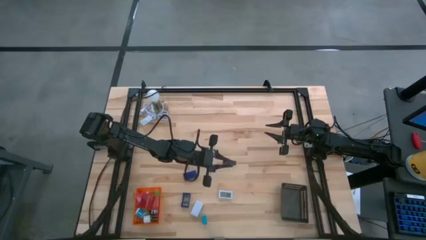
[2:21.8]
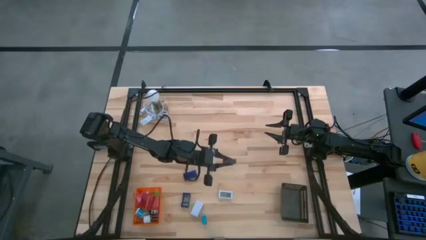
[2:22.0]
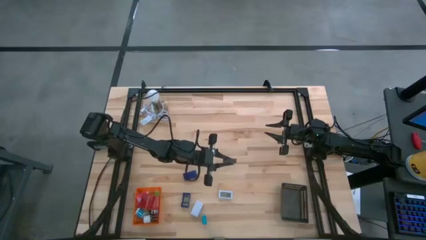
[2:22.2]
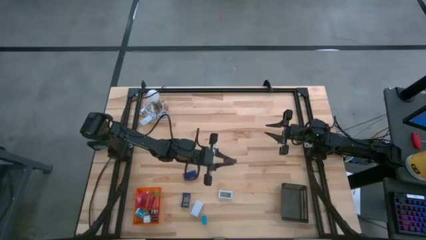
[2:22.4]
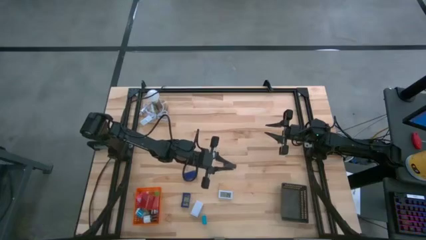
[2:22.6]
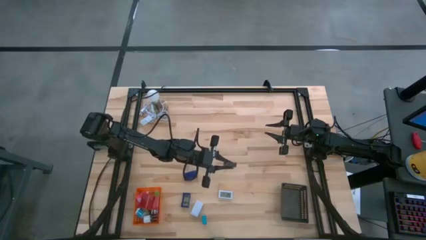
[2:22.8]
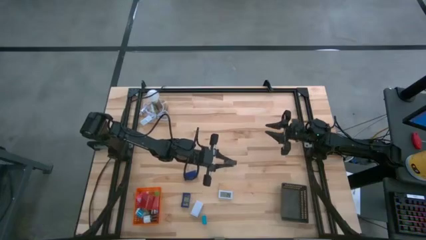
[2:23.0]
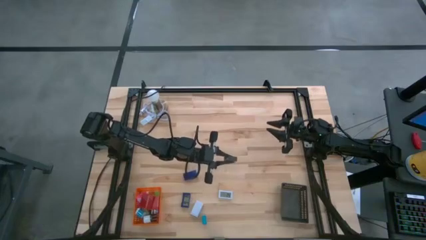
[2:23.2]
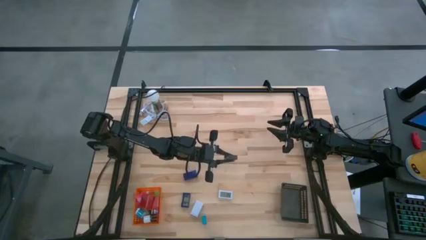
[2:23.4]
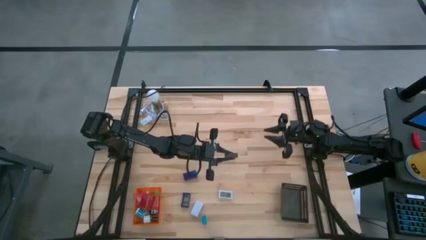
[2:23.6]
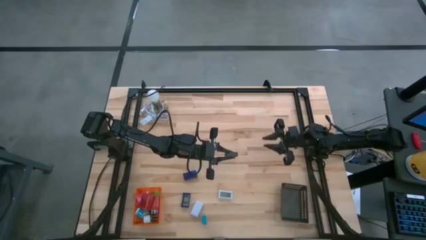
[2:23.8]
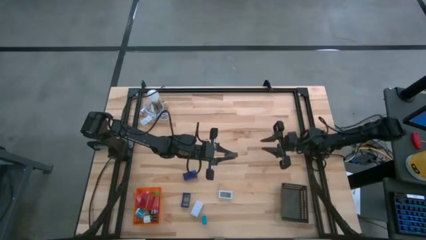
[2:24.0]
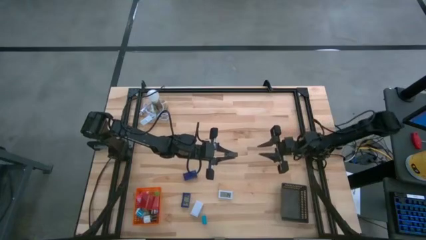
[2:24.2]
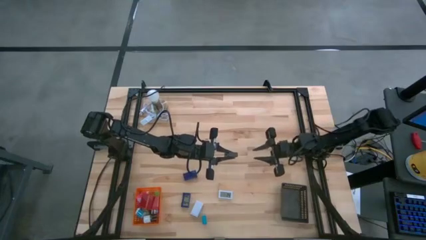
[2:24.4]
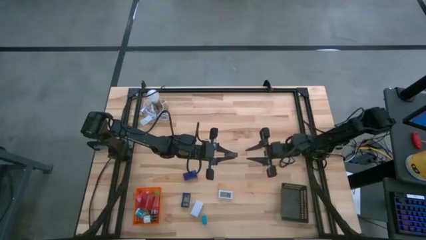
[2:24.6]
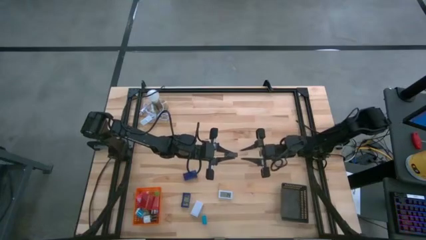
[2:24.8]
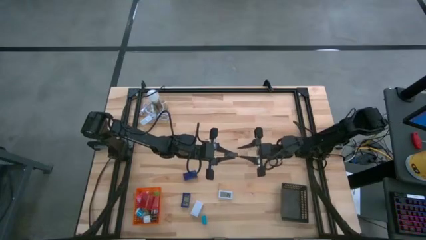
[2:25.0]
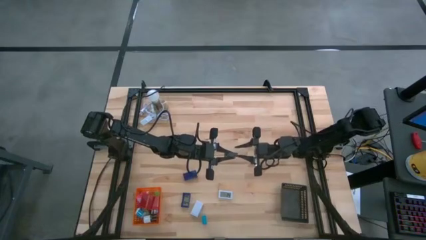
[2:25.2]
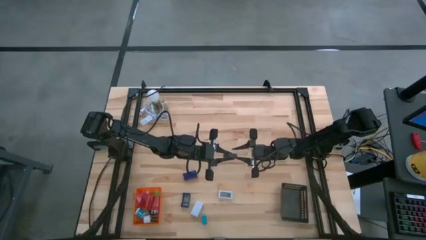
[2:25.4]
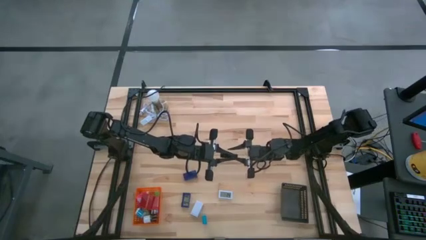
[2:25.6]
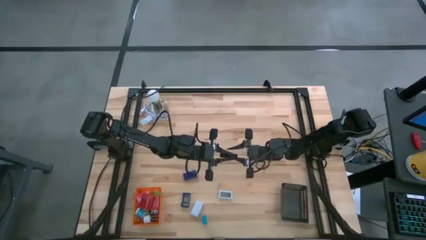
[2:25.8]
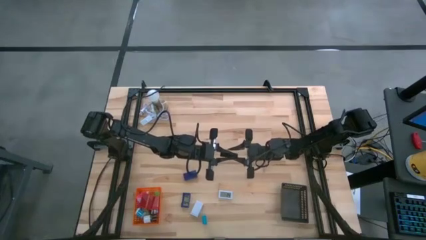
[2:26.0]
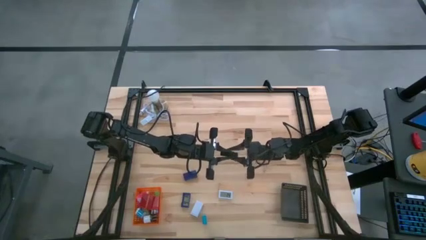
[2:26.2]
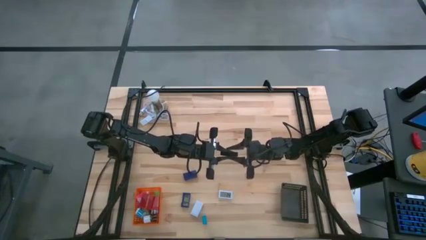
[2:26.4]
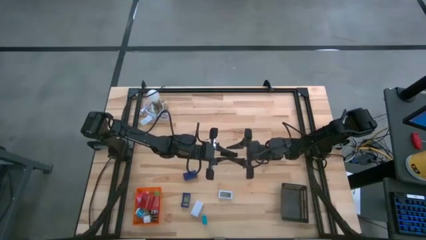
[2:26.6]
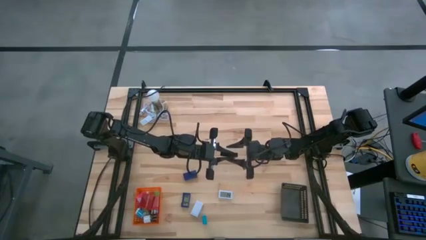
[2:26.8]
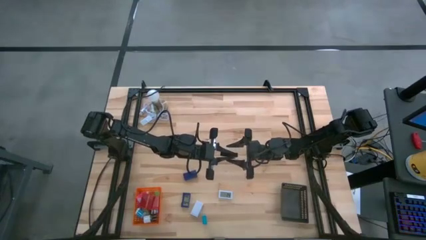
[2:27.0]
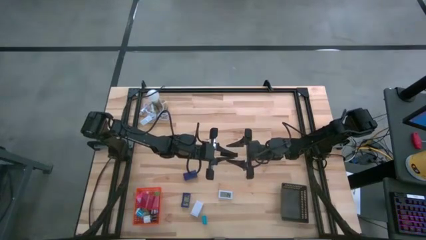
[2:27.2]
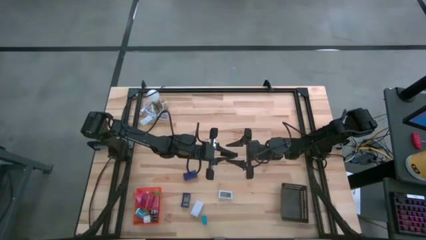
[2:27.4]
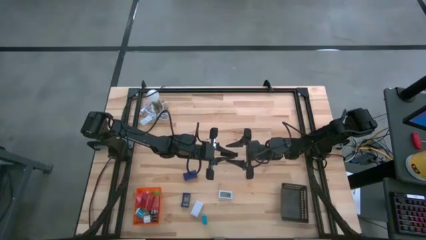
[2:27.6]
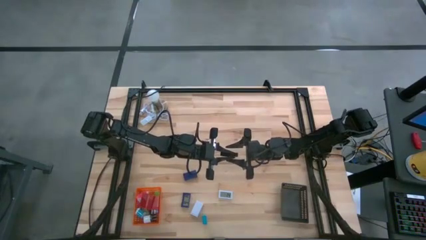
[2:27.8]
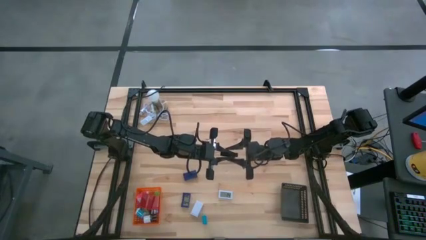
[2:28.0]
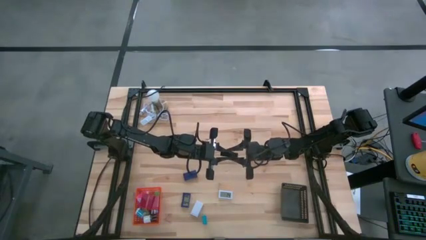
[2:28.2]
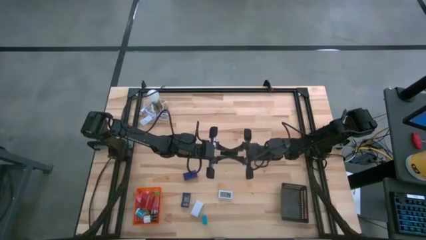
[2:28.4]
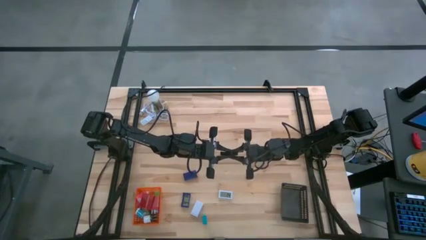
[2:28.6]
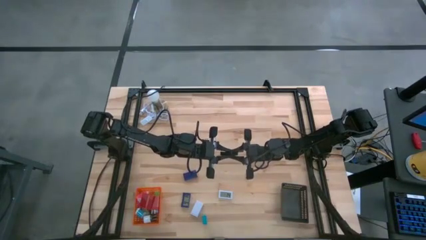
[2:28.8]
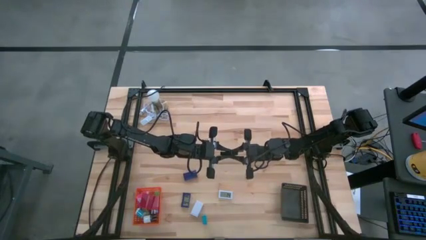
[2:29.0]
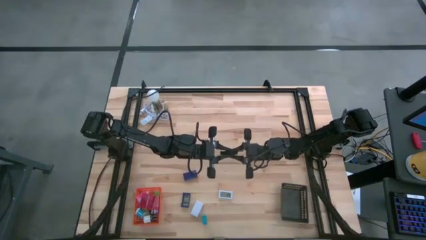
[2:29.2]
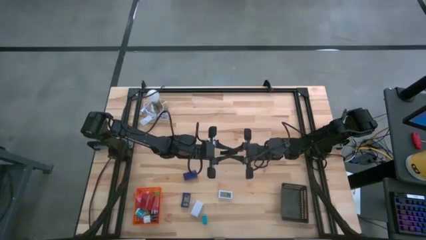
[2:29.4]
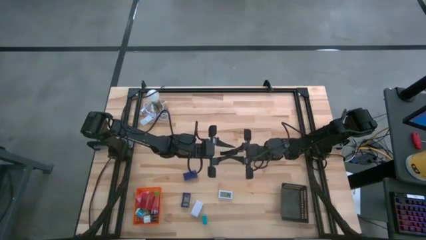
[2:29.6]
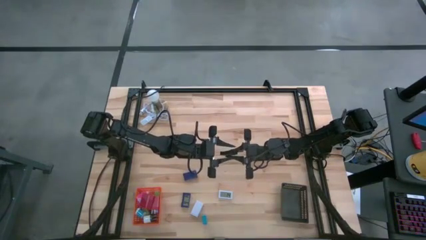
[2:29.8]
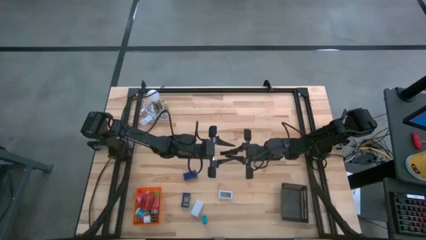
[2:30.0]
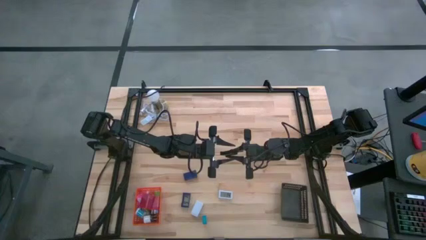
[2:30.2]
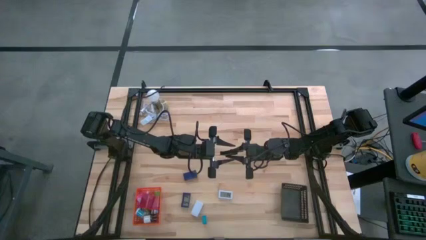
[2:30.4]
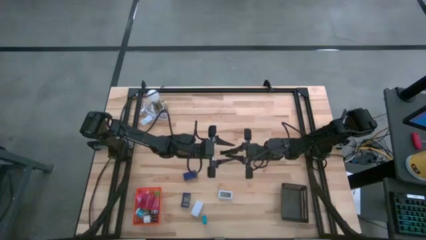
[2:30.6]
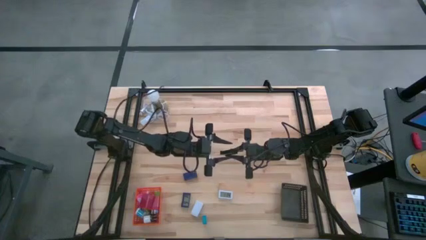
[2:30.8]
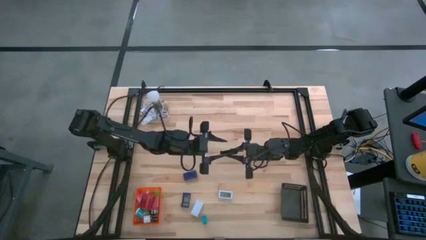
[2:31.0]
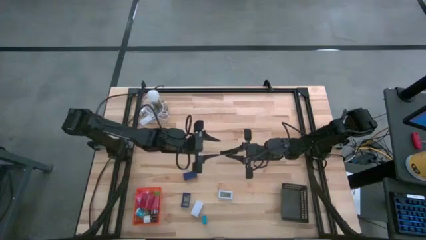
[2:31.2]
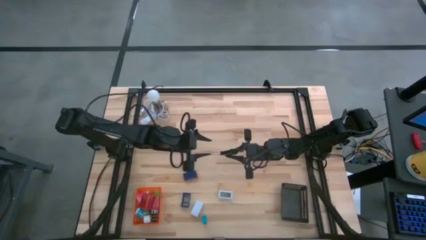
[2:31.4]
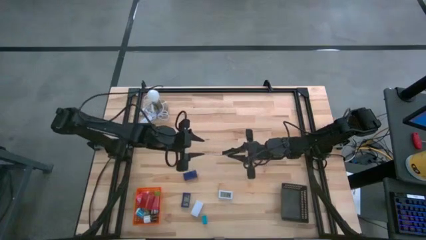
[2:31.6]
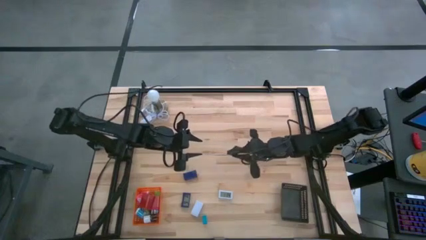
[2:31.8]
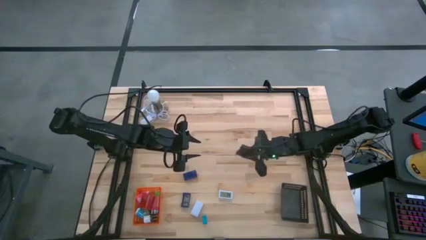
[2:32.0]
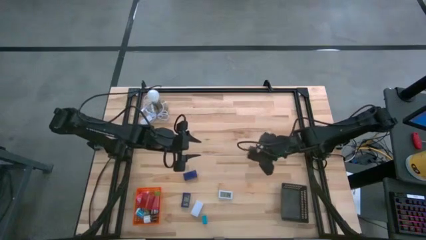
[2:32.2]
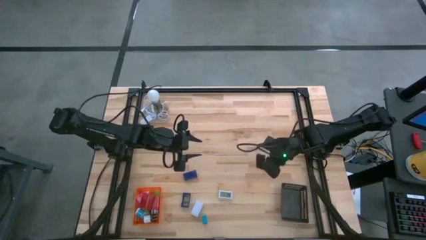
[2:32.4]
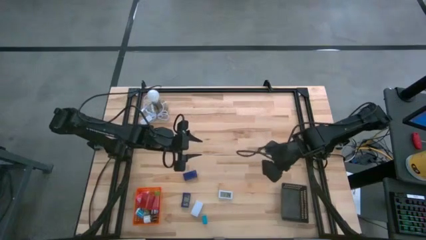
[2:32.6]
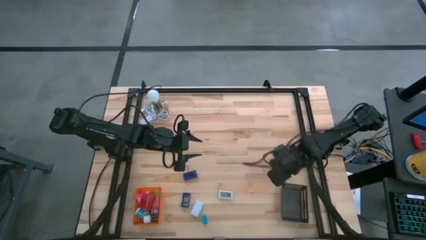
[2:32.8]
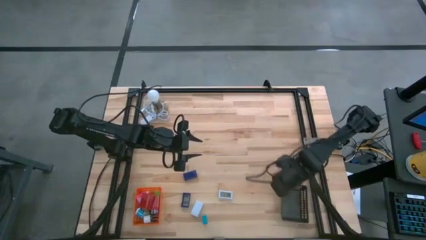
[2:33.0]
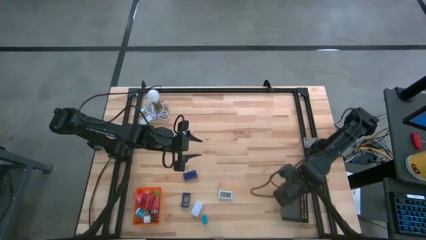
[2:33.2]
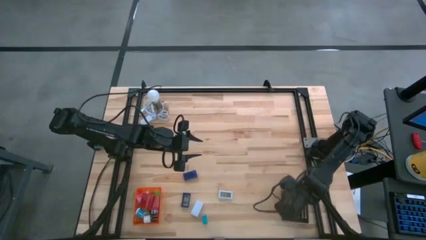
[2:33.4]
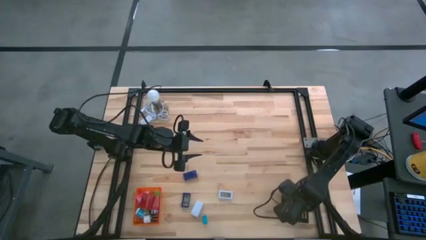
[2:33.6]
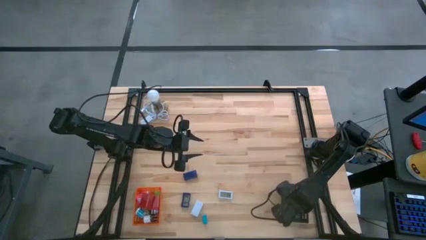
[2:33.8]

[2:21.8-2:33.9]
Task: Pick & Place Office items
Put the black digital clock into the black bin

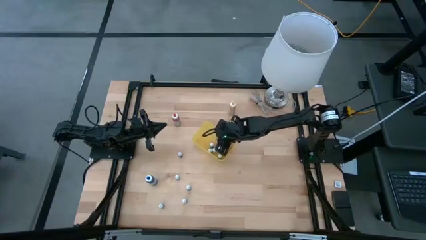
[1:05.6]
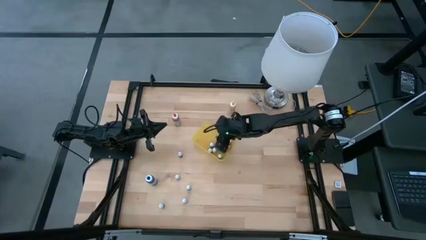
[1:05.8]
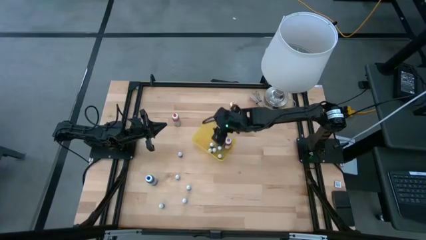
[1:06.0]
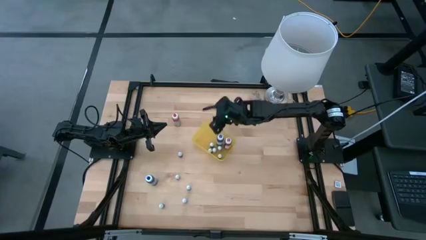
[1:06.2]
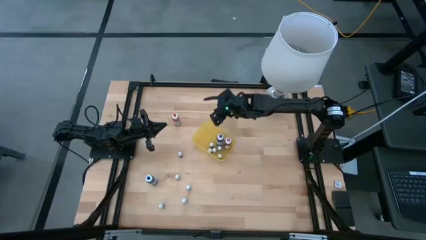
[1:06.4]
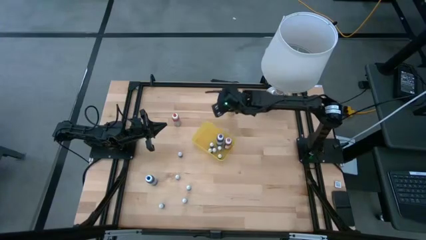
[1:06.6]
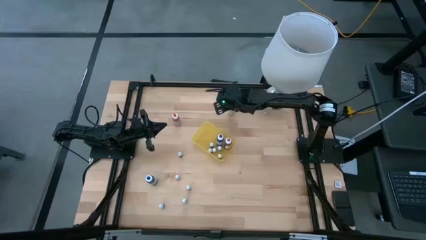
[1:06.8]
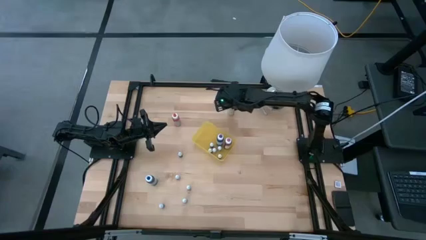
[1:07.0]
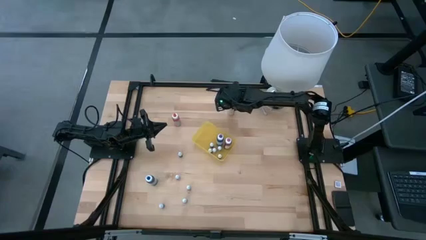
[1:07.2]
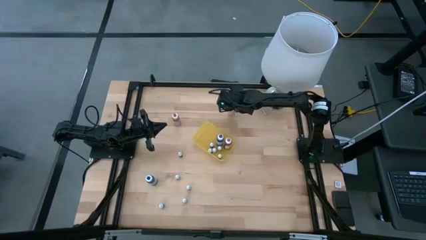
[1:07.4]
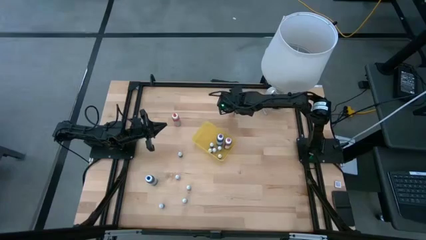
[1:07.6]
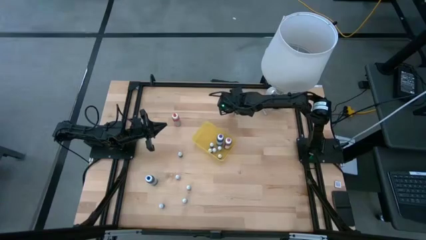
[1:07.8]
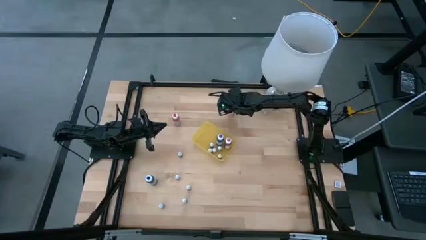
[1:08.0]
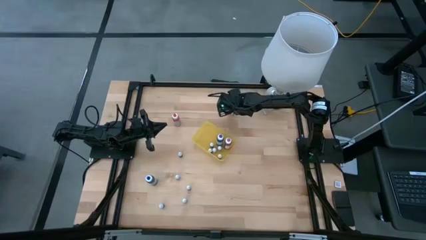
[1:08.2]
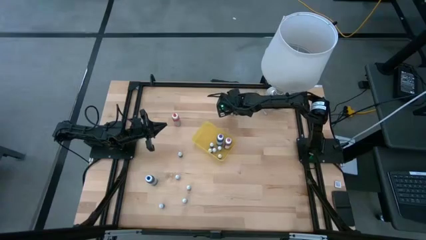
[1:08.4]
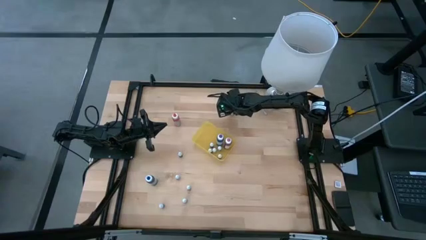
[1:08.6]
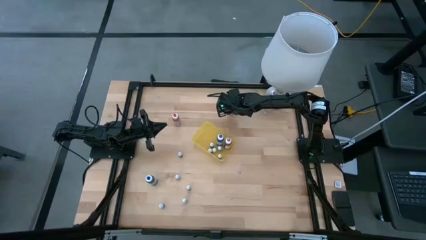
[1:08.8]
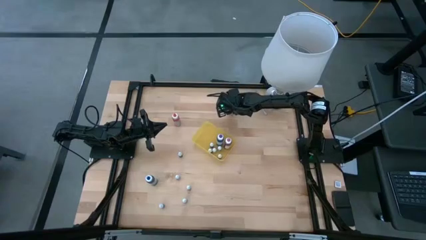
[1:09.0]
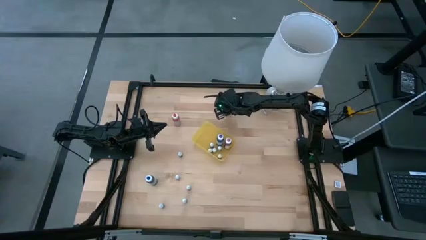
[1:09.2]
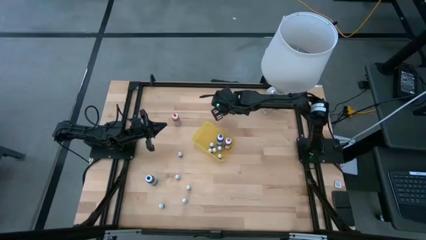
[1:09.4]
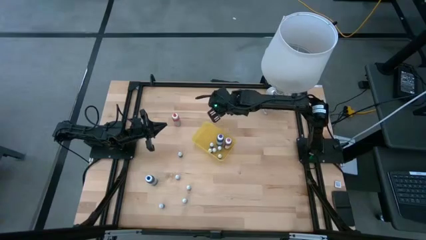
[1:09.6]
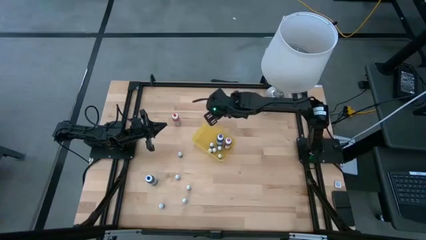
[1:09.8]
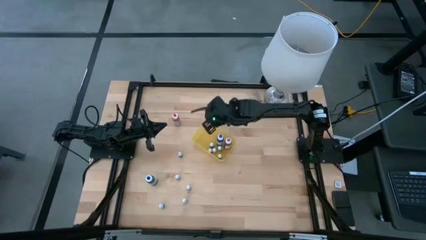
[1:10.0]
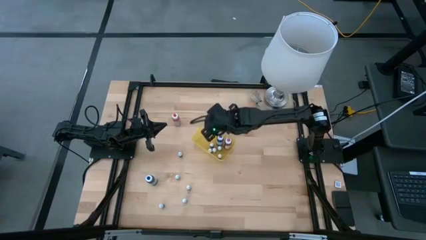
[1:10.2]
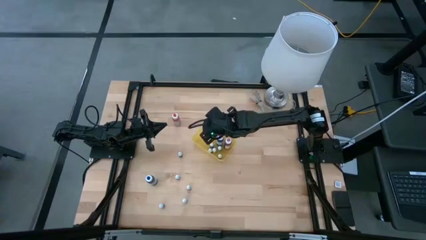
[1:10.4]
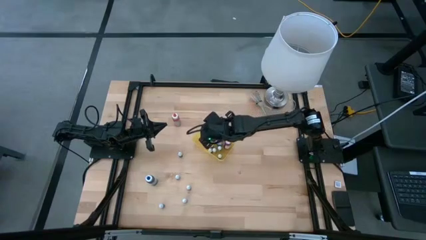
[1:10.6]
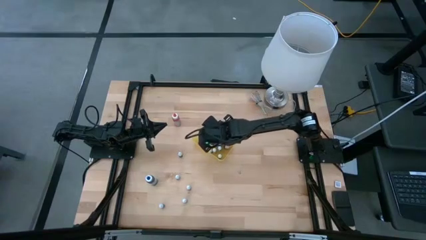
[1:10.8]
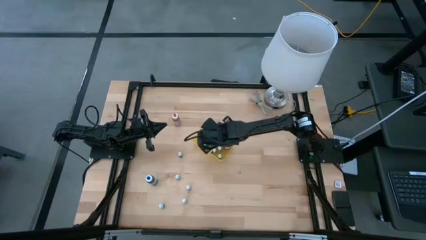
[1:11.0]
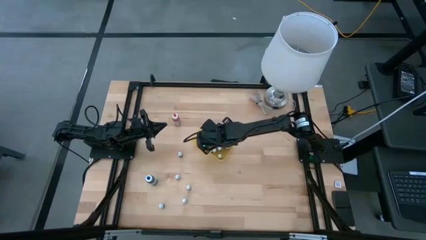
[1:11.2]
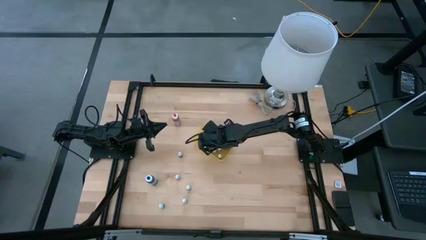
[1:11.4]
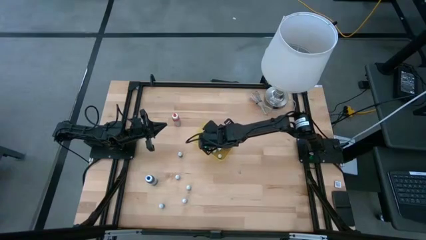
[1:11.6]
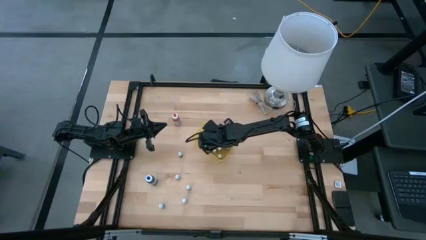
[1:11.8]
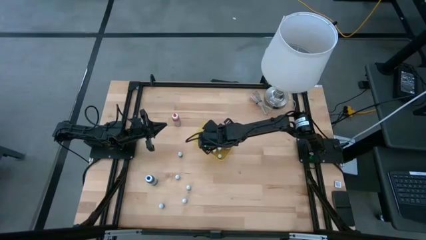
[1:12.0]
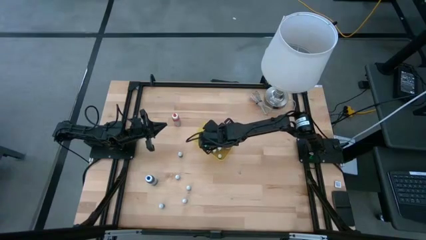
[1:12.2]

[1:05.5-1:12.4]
Task: Pick & Place food coloring
Put the large yellow food coloring bottle into the yellow bin
